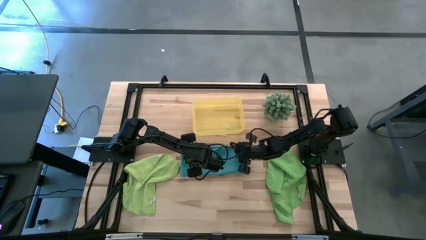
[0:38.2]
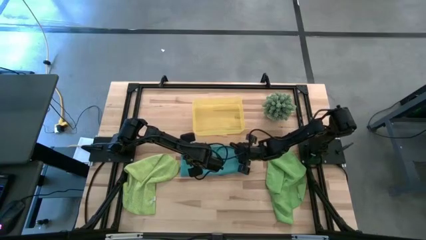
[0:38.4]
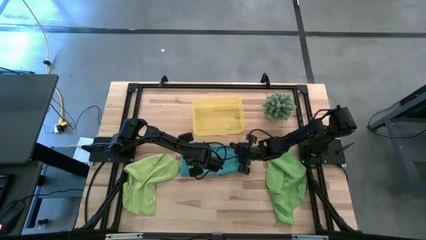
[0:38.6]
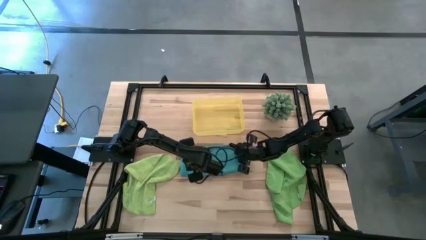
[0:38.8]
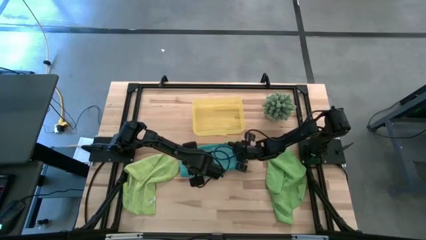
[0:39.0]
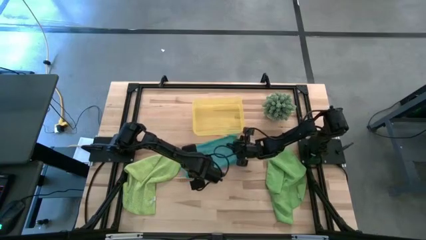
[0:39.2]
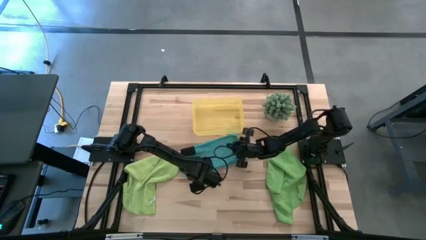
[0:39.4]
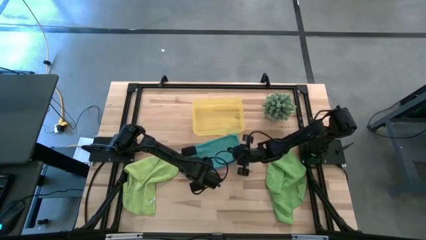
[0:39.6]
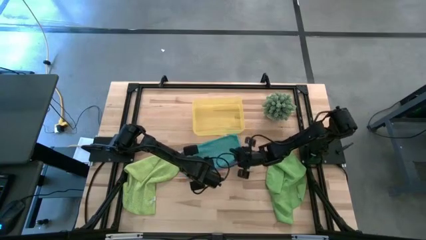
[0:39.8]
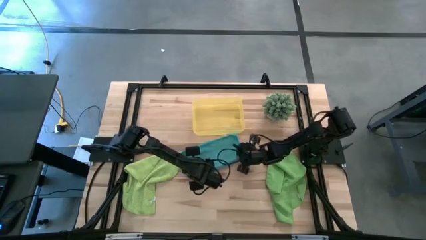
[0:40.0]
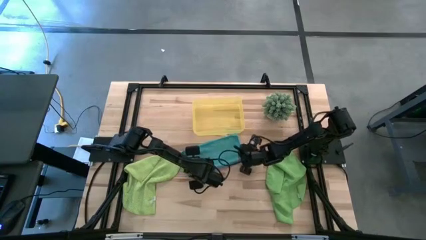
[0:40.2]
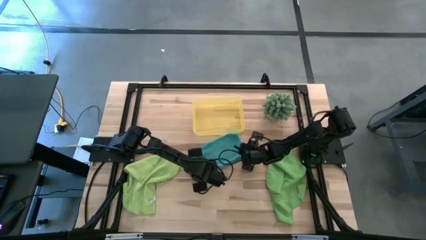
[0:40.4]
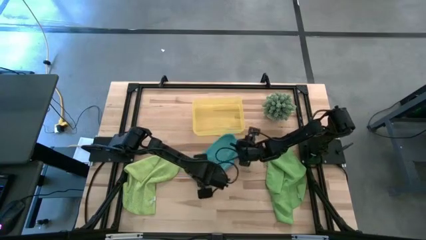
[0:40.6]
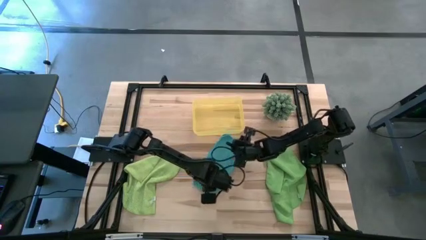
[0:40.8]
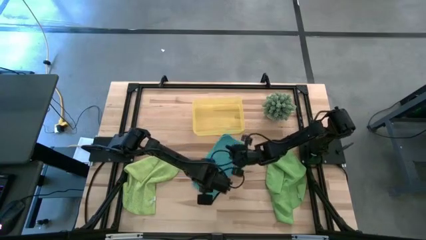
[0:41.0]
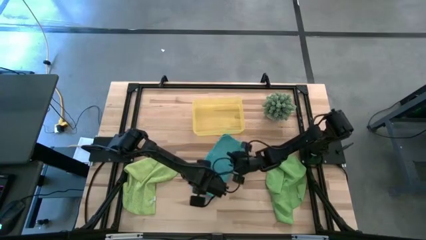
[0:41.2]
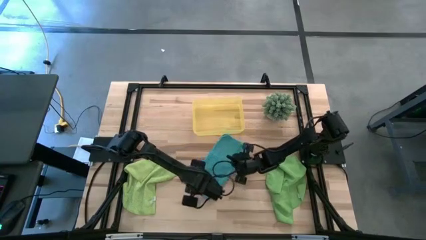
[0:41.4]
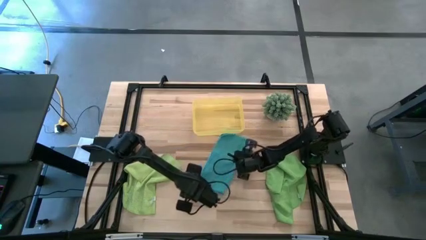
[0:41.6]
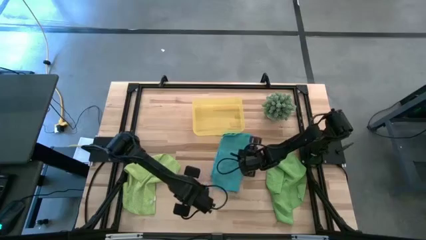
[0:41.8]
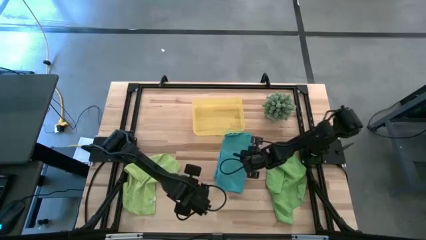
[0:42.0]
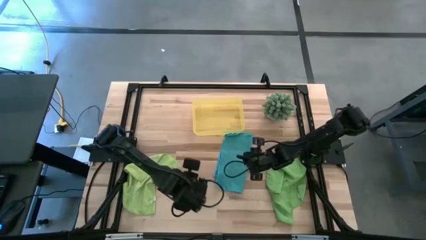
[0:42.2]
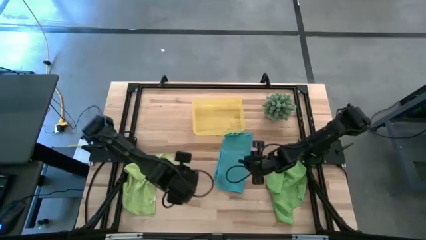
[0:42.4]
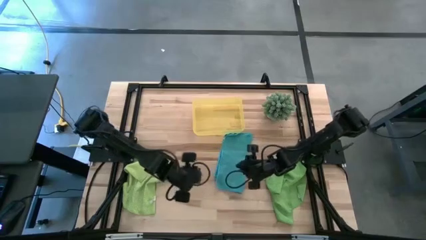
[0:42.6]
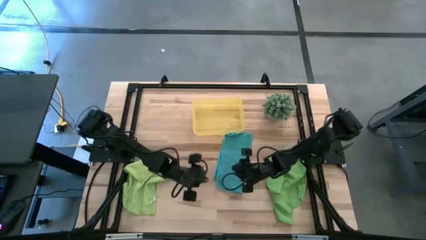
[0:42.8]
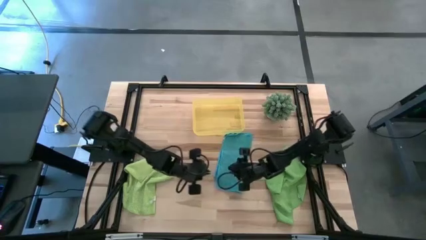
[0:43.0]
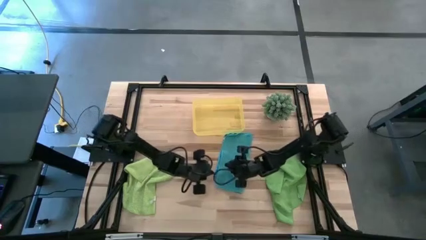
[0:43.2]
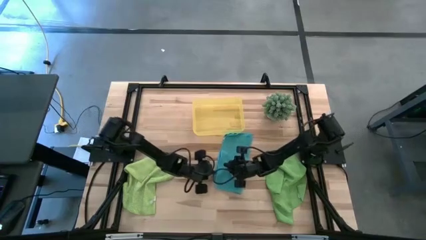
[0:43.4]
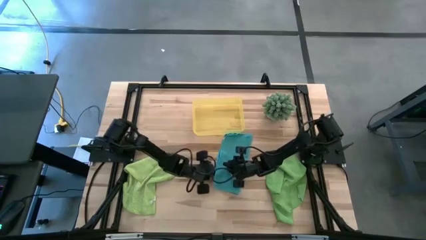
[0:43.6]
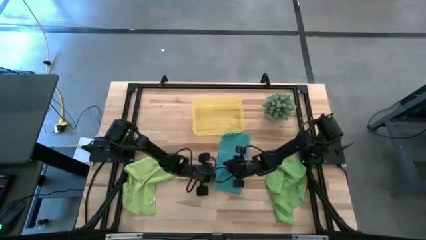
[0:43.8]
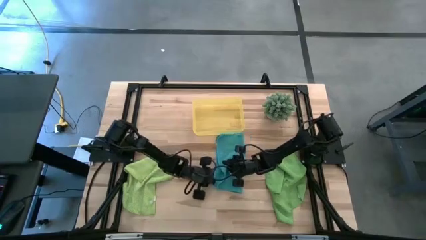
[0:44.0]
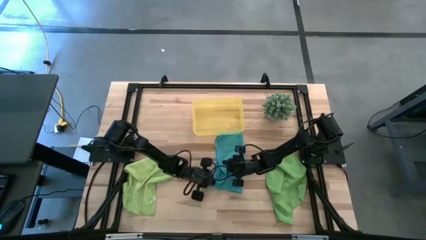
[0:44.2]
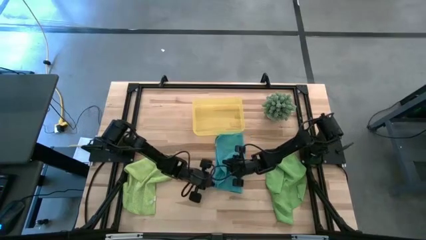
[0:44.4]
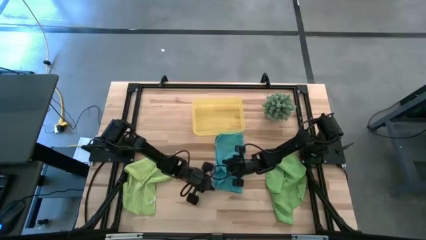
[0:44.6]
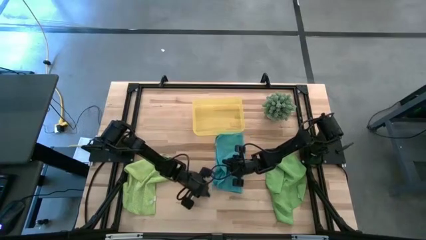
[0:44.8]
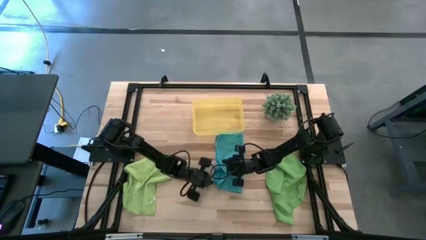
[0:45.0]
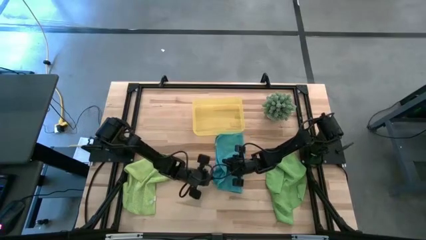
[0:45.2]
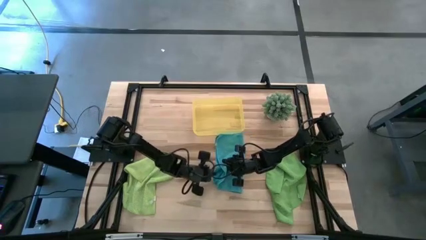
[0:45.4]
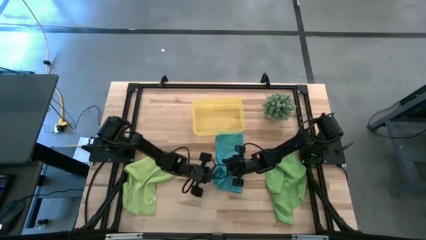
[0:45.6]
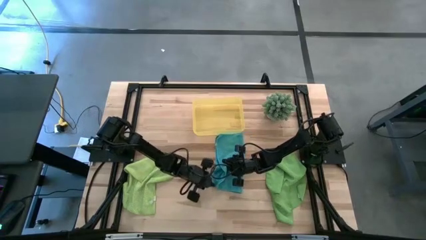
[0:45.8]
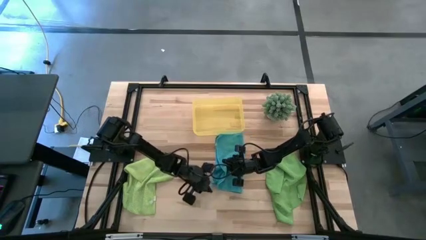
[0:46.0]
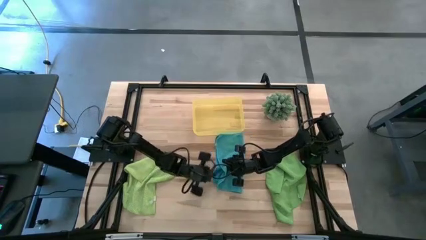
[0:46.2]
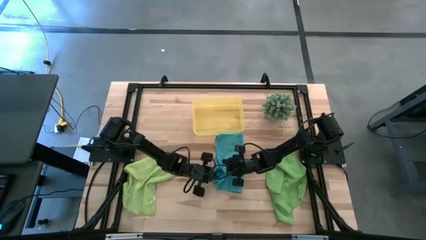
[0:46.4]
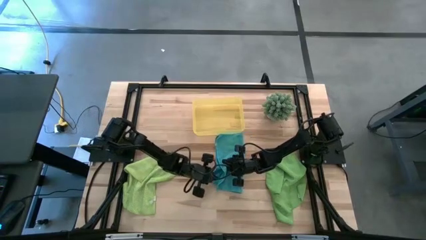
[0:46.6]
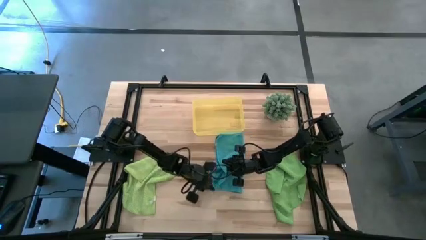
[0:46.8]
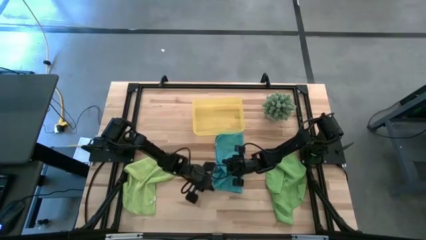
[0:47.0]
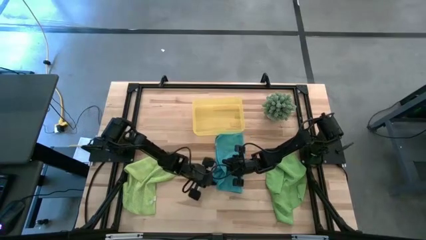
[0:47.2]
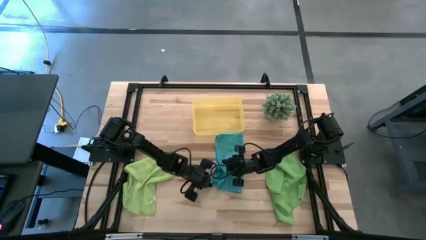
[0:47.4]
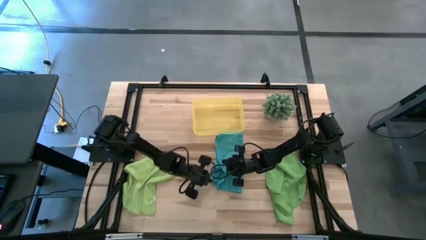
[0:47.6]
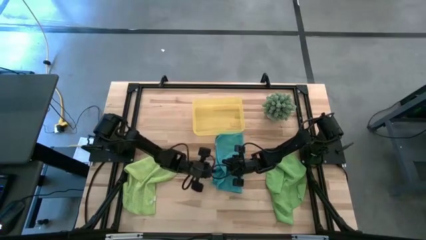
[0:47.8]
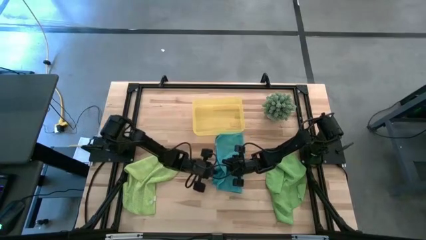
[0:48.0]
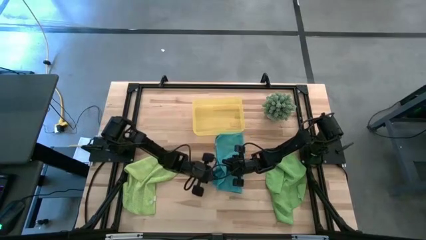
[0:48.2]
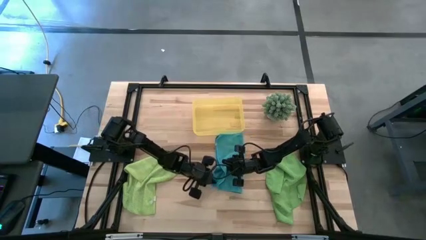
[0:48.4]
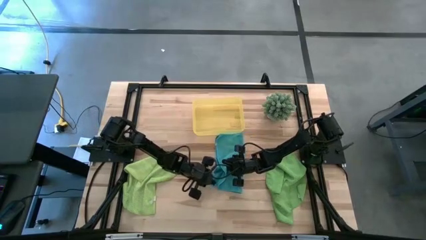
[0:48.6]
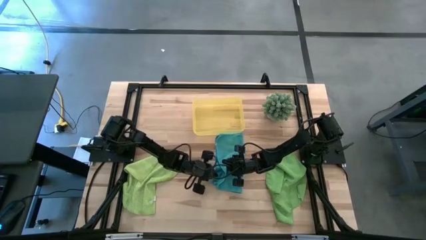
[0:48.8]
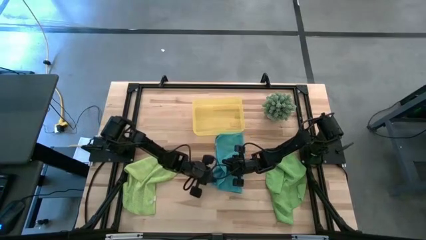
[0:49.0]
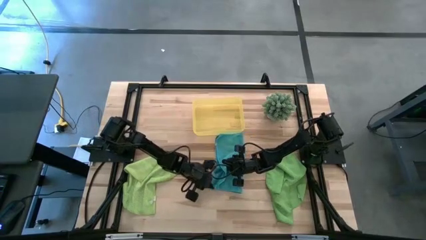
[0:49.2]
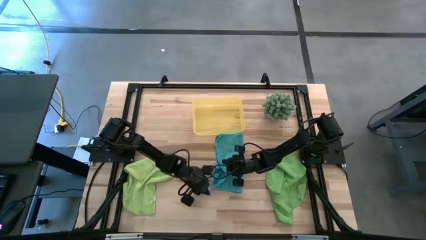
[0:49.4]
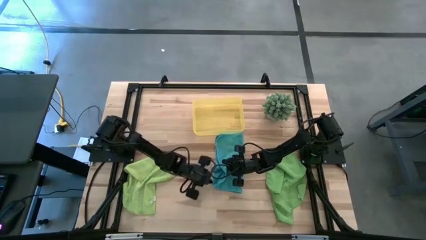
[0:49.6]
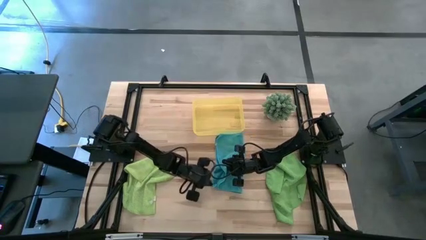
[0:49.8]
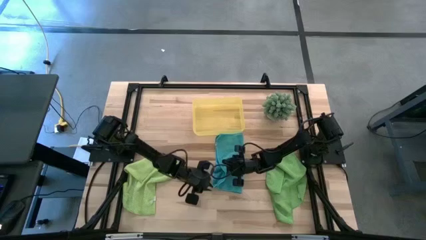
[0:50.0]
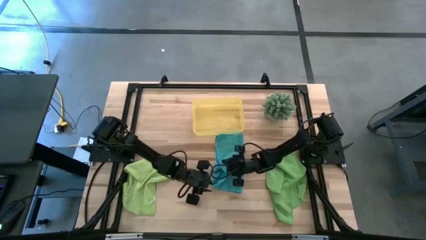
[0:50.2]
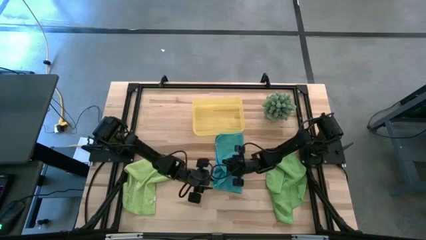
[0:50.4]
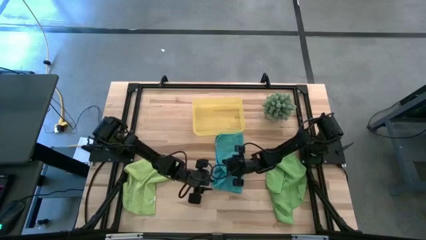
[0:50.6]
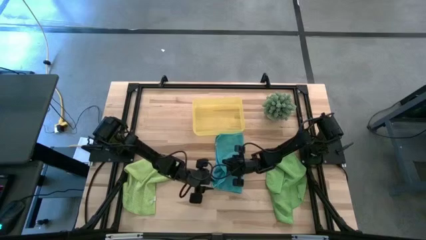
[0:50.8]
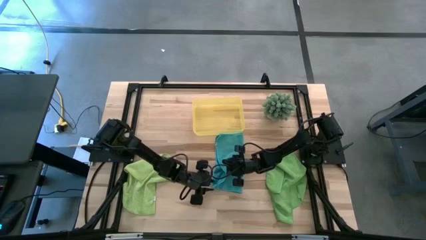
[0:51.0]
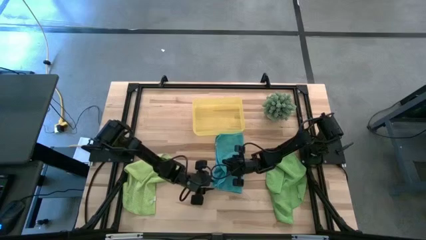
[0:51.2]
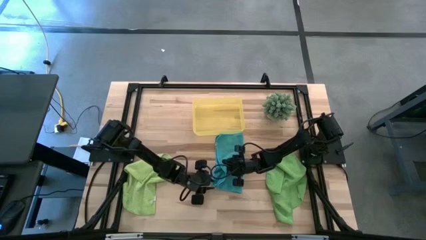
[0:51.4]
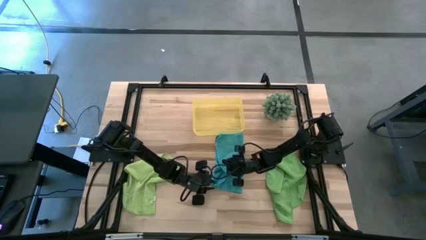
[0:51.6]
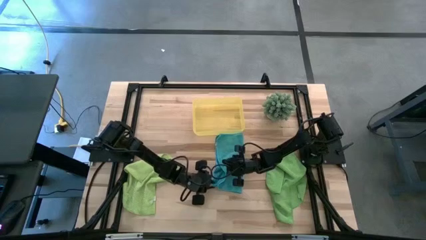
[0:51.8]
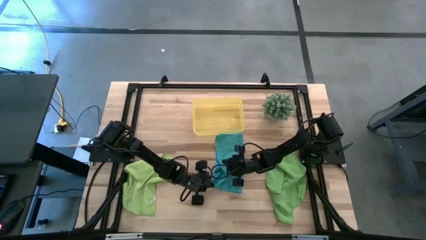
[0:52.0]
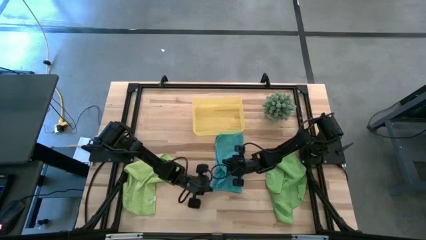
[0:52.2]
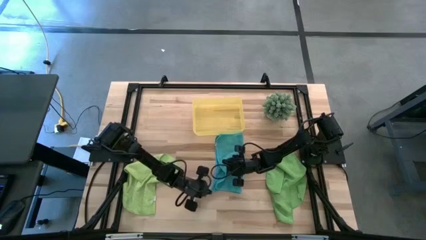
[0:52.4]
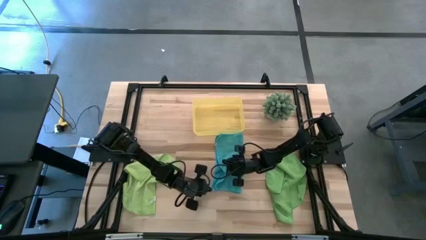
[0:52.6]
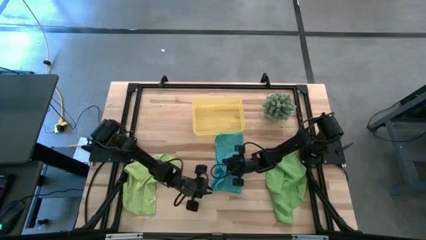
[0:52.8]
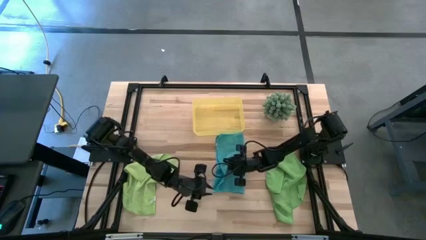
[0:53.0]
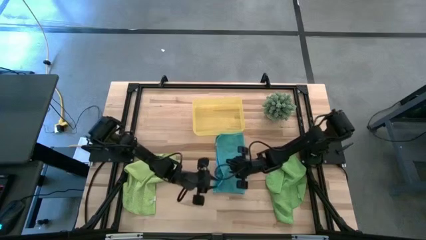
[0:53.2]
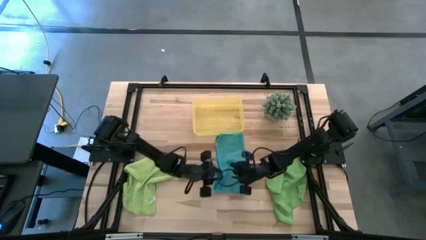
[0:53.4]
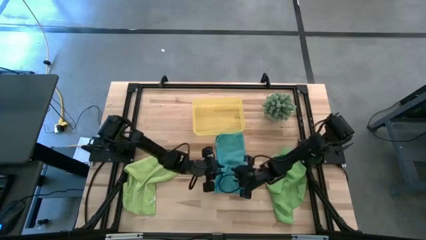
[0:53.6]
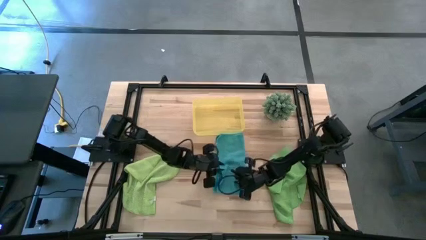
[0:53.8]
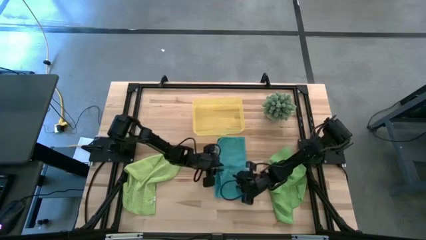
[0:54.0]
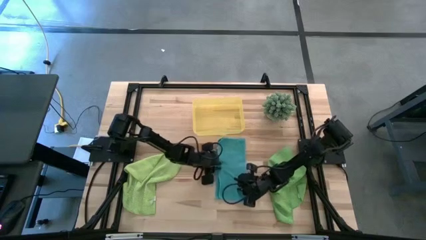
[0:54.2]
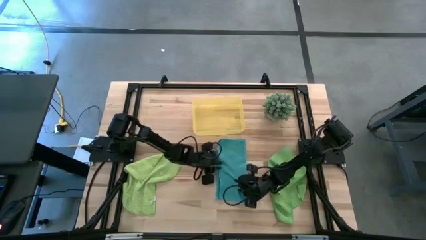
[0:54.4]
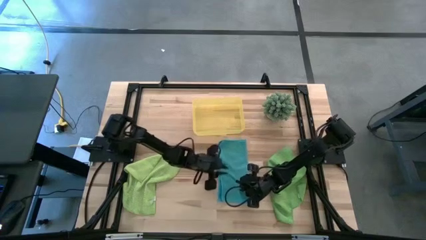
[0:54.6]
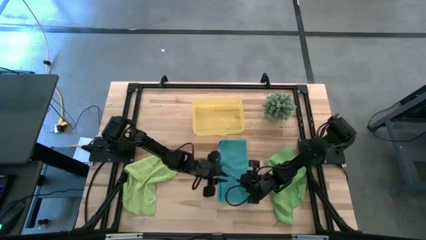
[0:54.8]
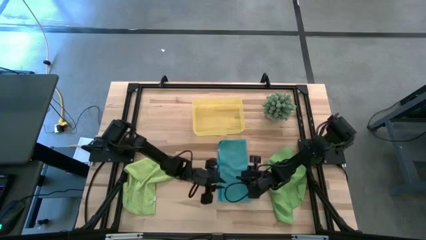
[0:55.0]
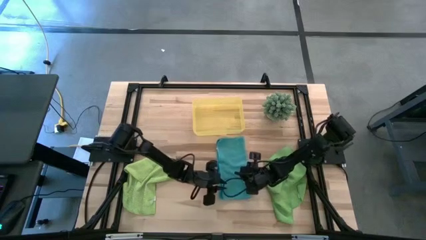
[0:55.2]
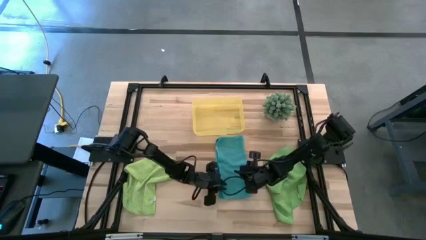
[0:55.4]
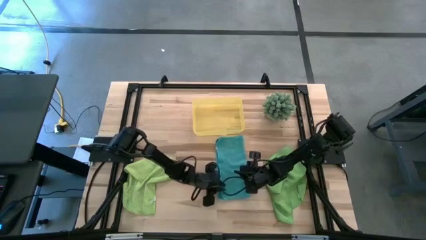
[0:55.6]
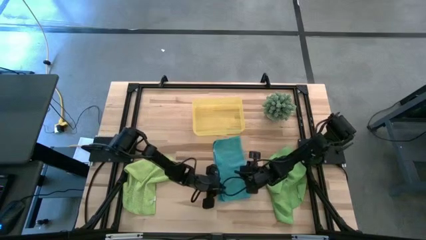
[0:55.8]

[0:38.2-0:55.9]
Task: Roll microfiber towels into tight, uniform cylinder then place into a basket
Fold the blue microfiber cloth
